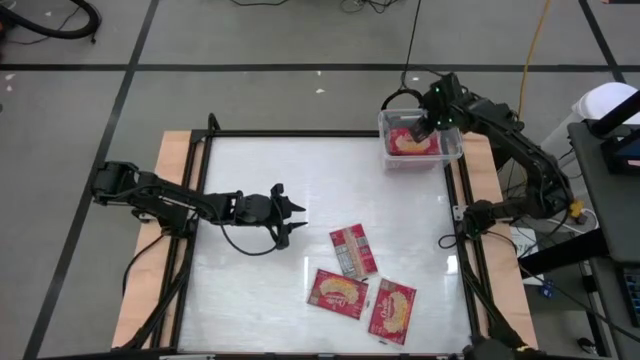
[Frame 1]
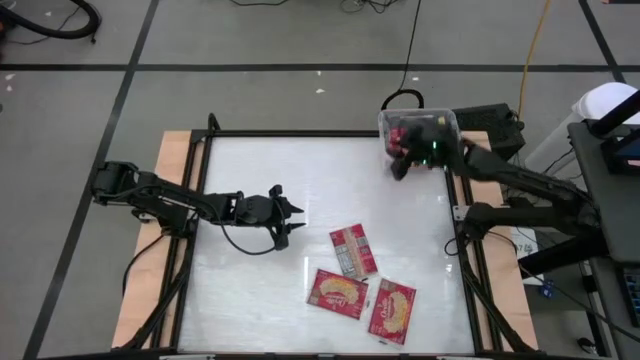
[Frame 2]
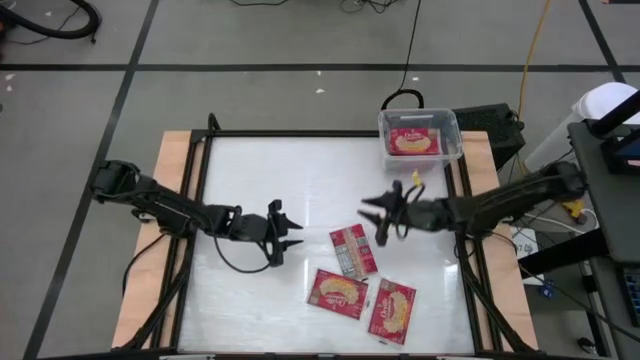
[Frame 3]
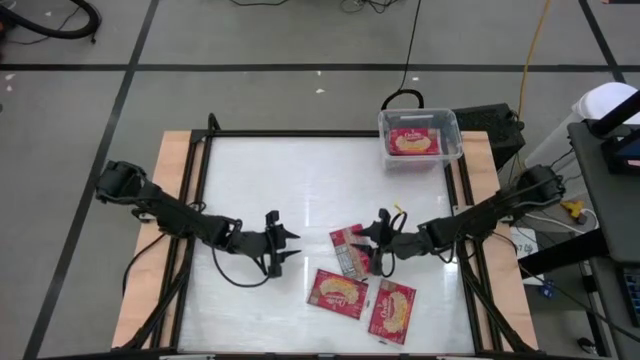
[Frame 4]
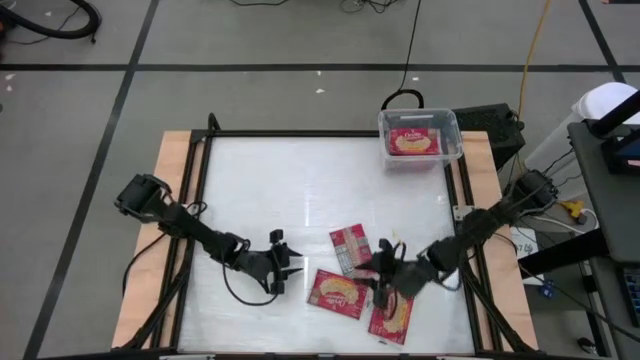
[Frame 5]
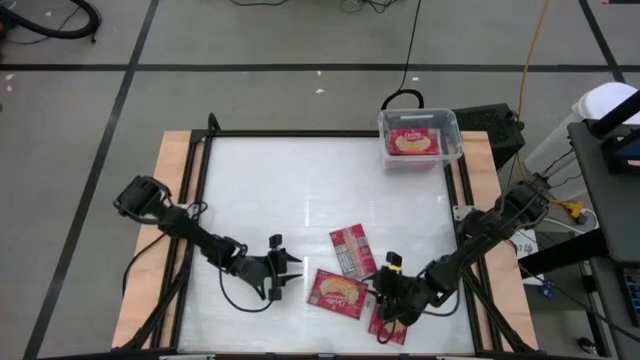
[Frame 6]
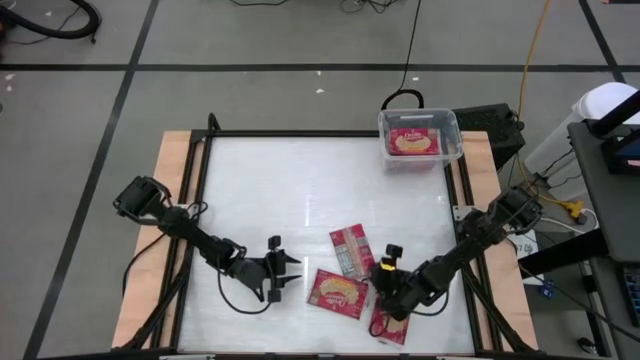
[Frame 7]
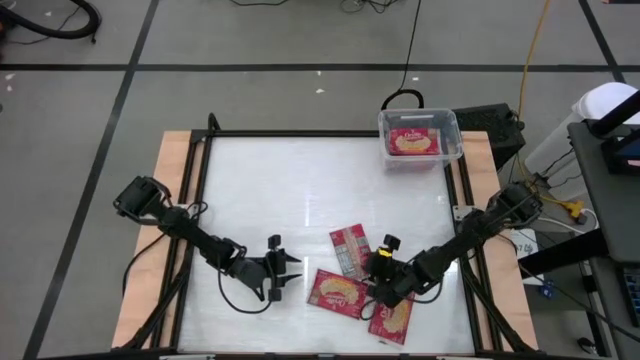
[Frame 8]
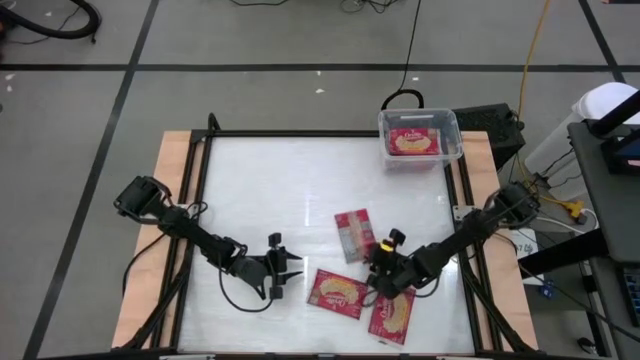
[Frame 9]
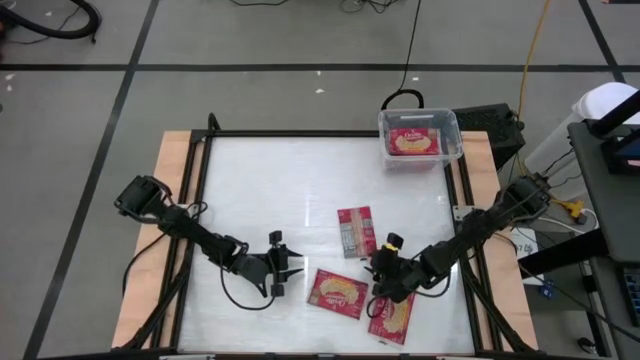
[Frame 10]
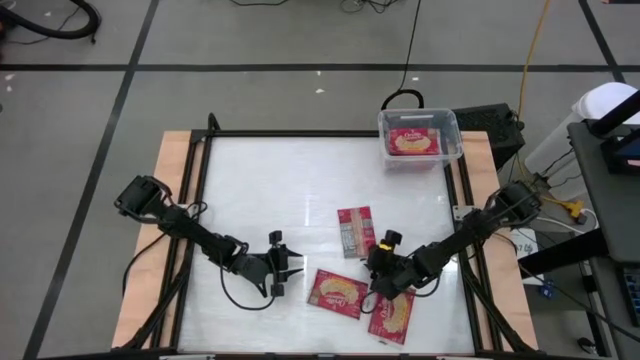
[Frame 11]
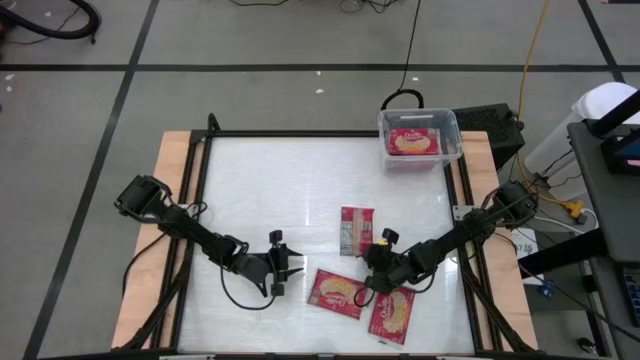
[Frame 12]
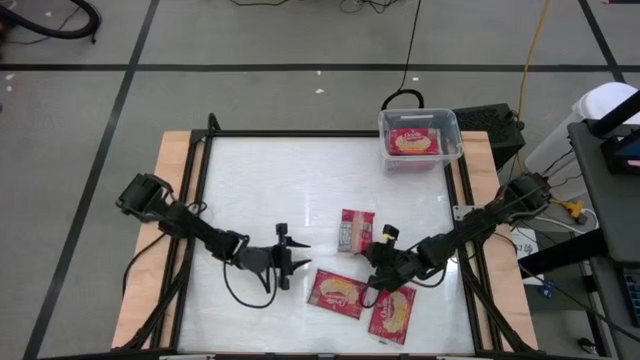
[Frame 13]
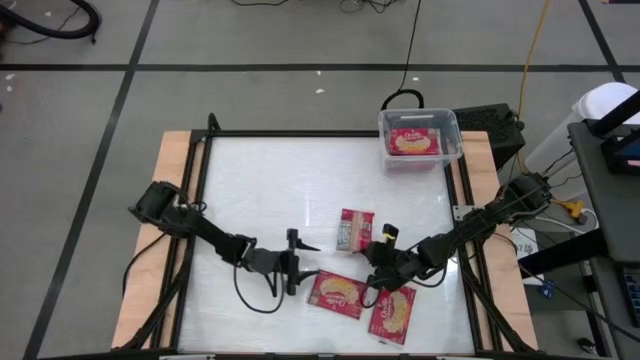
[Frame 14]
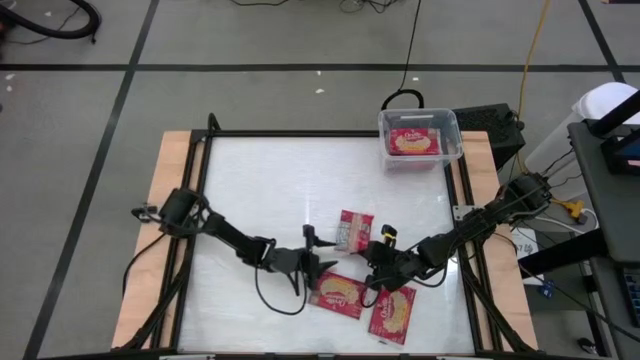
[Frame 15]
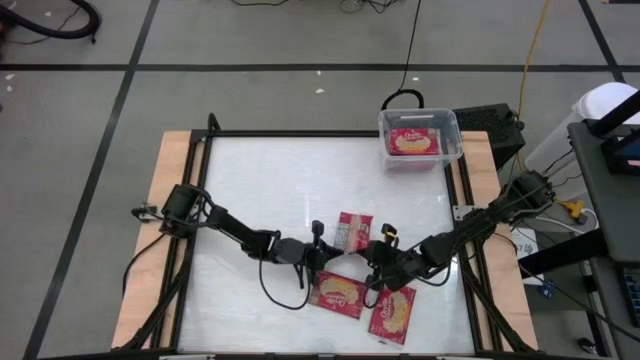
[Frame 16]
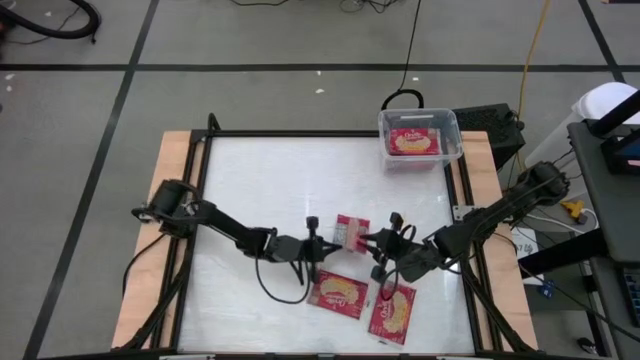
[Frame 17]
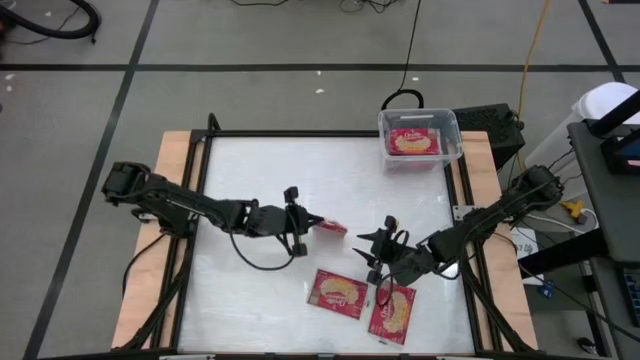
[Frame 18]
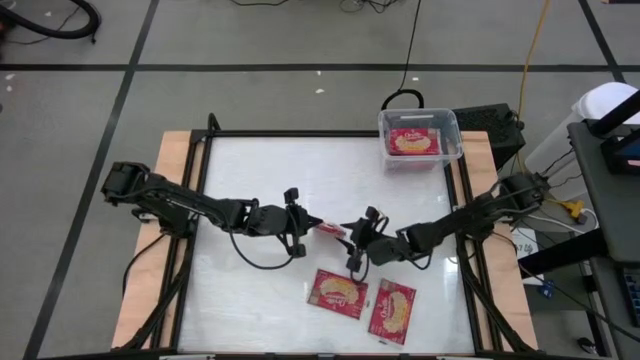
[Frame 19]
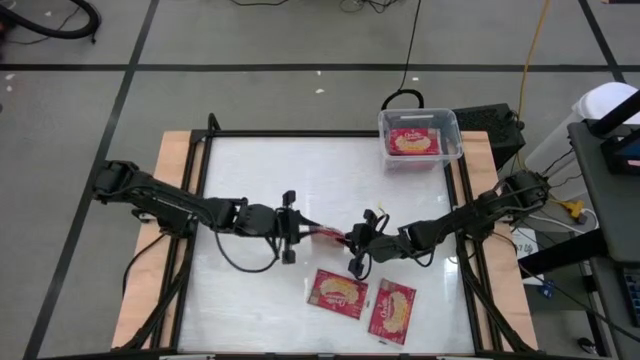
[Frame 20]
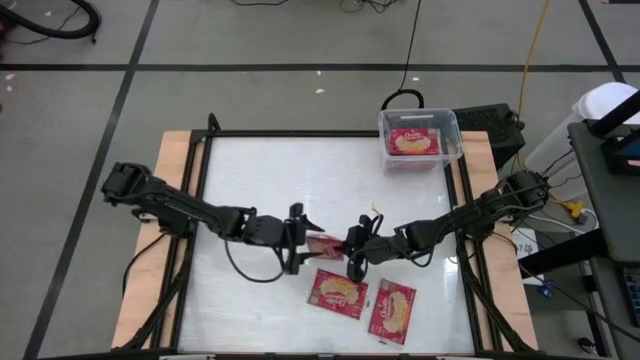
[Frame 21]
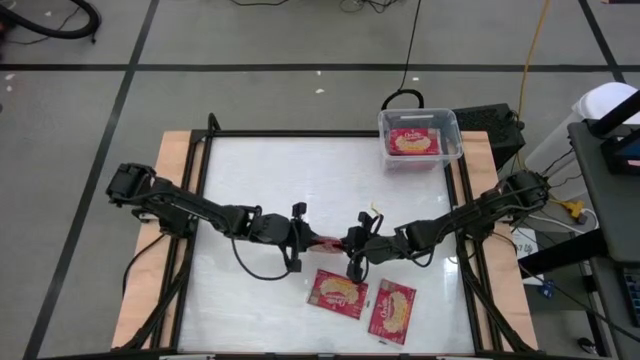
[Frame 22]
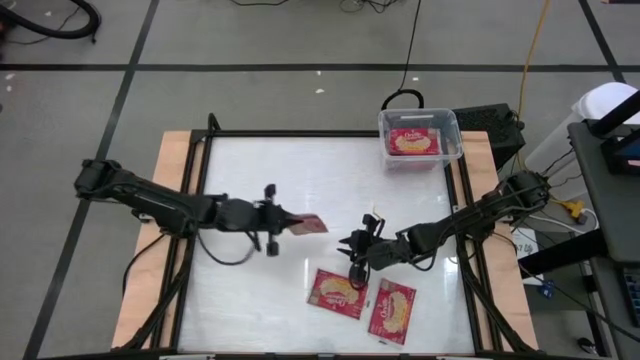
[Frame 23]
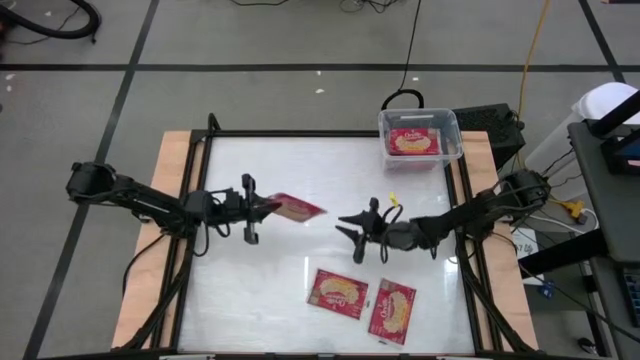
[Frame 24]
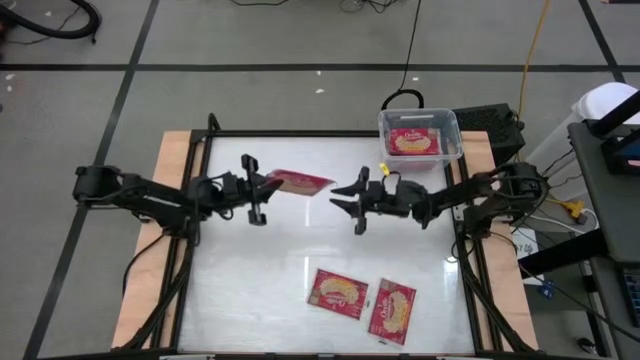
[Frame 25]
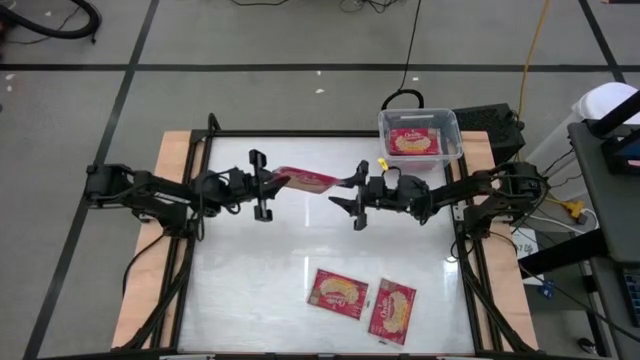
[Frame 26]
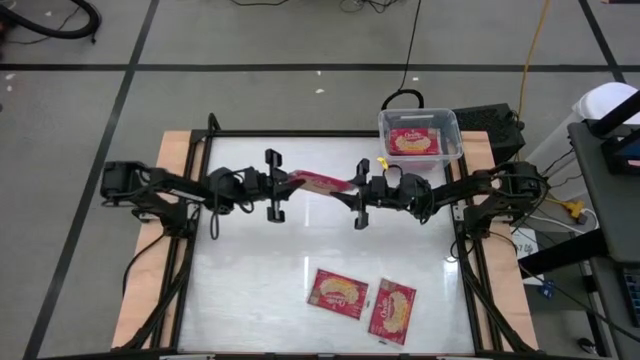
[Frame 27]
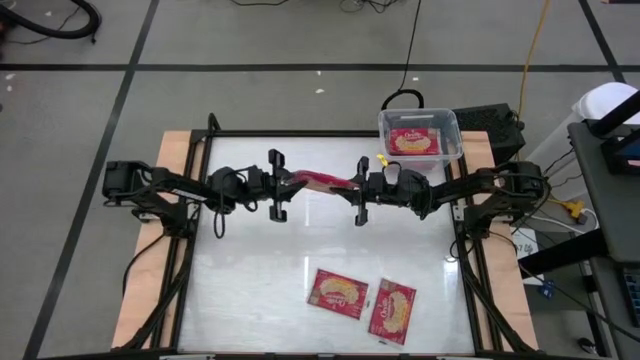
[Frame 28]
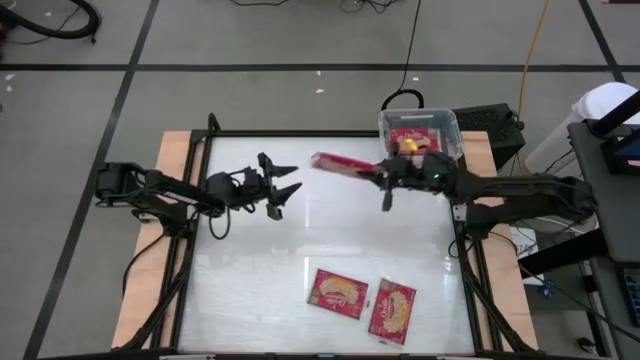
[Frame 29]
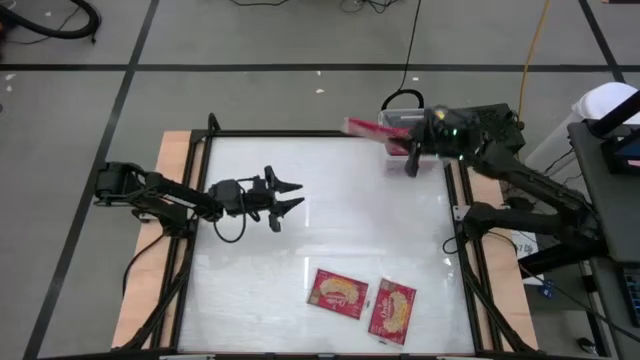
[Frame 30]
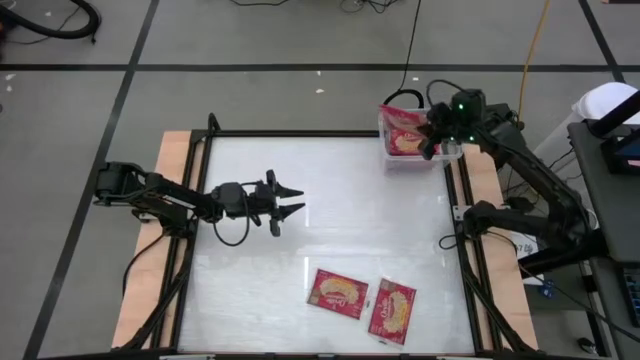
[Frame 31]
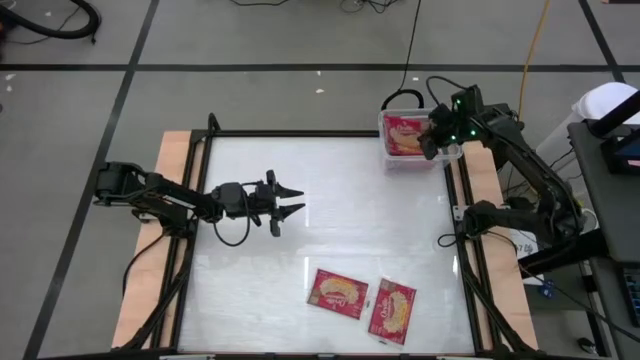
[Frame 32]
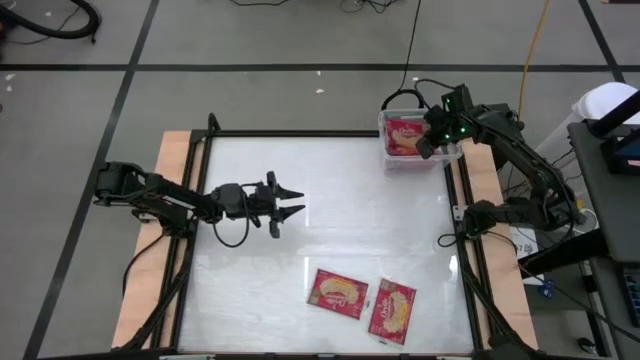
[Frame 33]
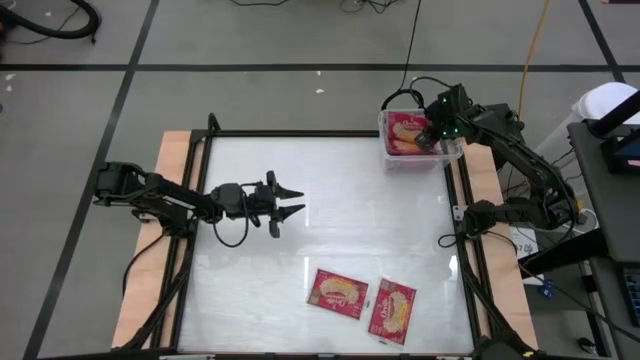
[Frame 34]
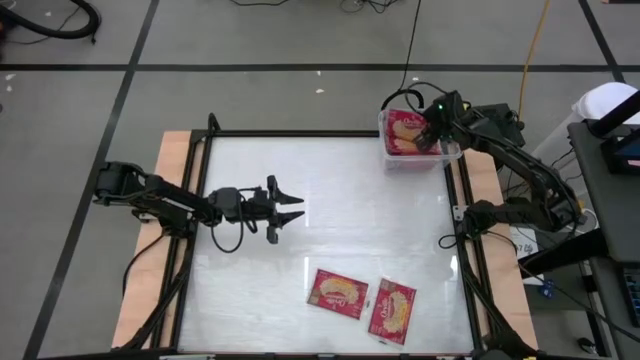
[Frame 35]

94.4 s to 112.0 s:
Task: Sort popcorn bags into baskets
Put the red popcorn bag into the transparent bin

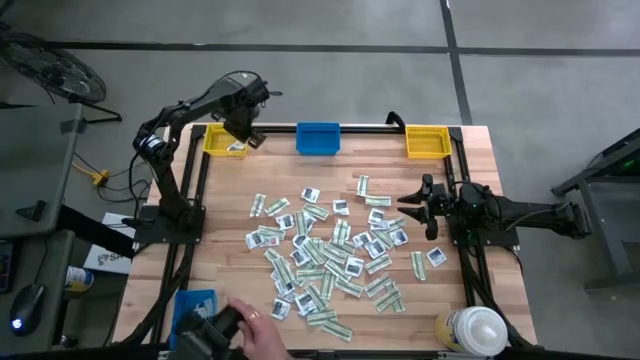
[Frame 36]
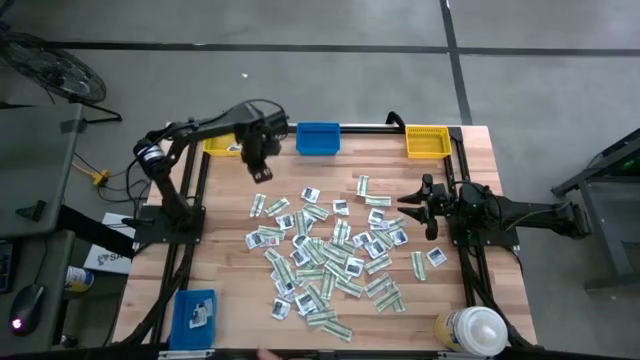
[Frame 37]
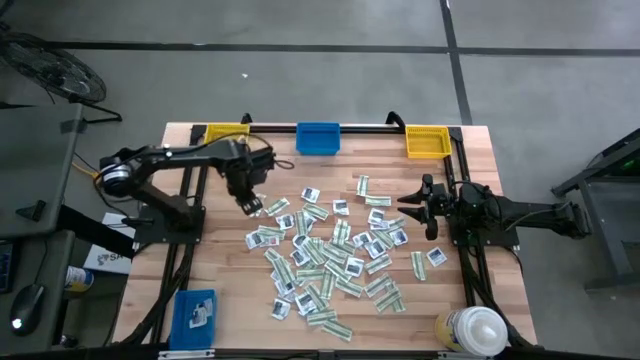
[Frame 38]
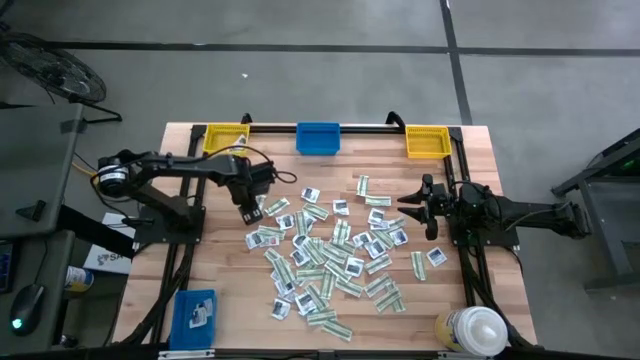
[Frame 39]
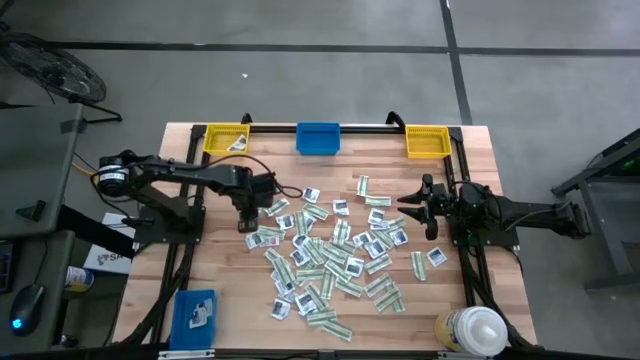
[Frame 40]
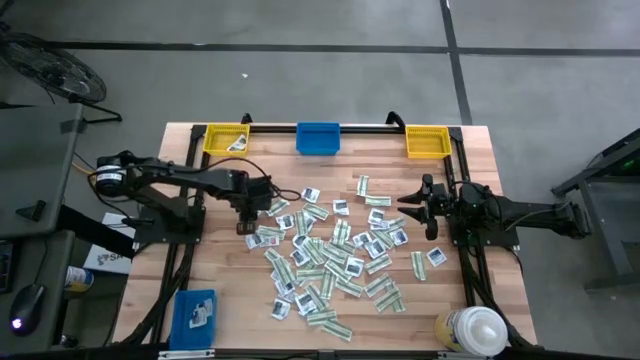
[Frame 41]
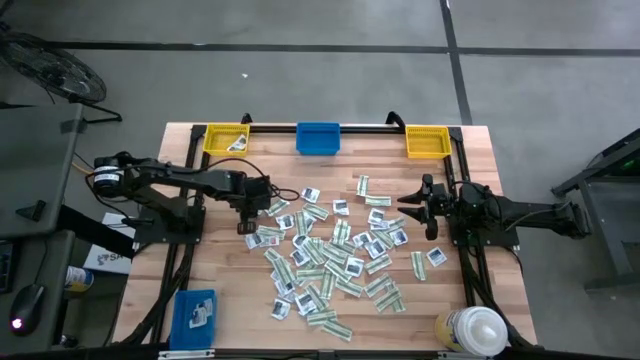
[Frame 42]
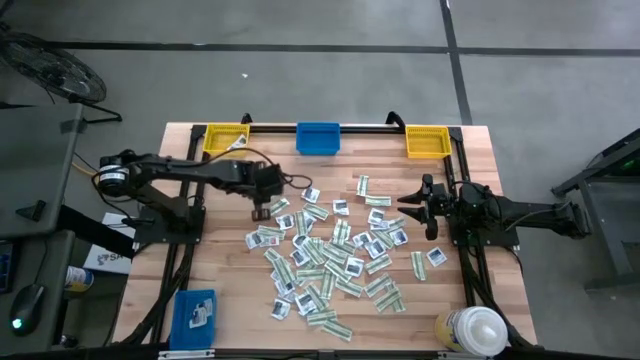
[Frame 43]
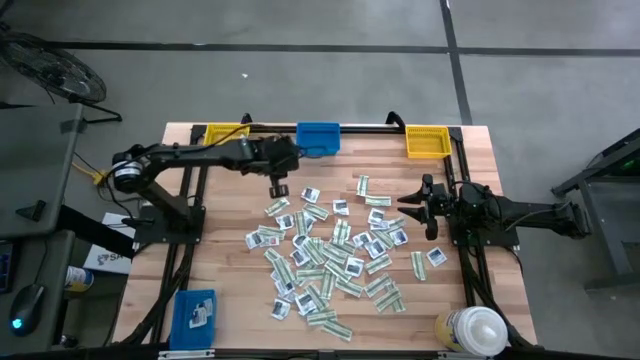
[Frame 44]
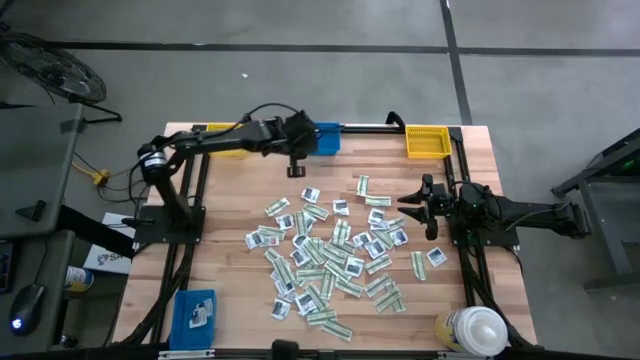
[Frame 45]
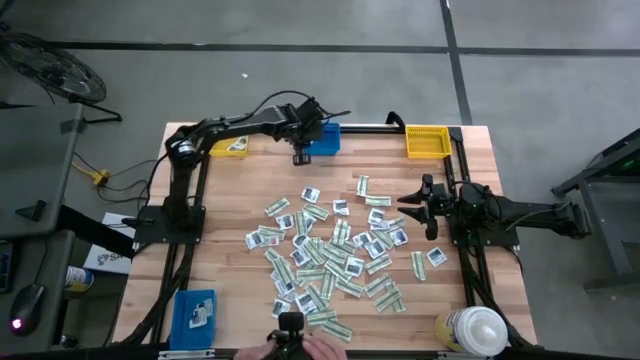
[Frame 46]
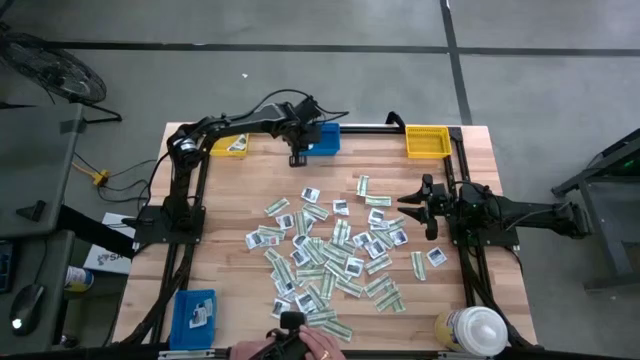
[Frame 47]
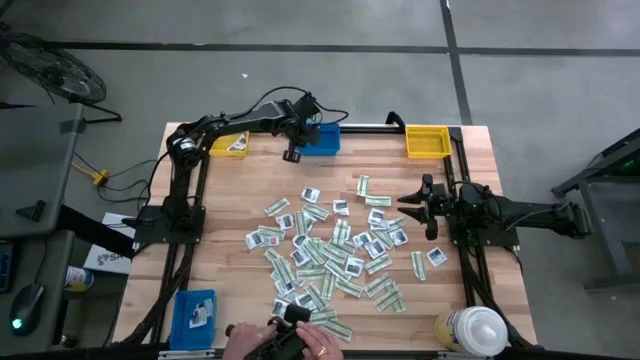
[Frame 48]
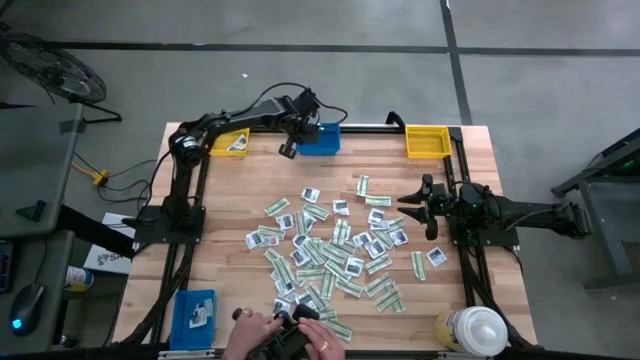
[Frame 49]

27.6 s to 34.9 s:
Task: Pick & Place First Aid Supplies
Put the green bandage pack into the top blue bin
